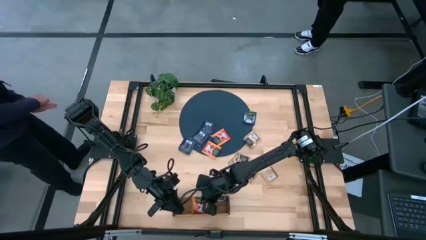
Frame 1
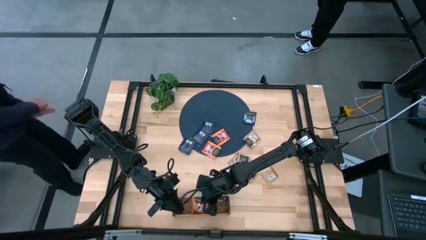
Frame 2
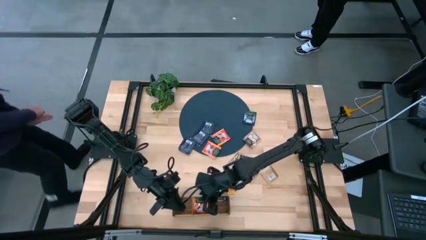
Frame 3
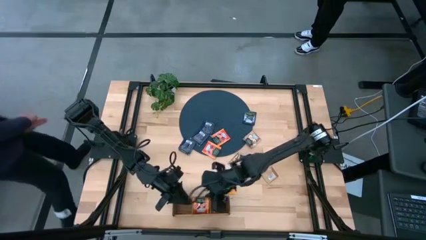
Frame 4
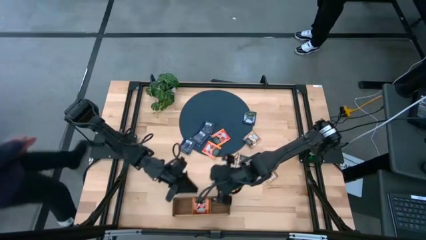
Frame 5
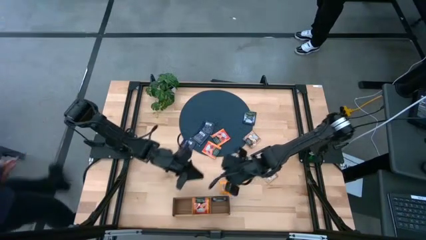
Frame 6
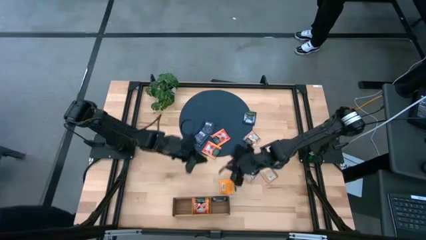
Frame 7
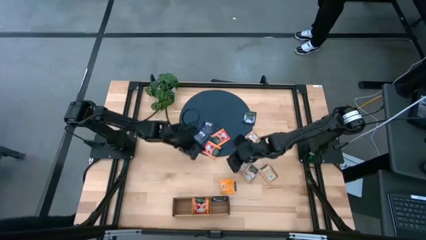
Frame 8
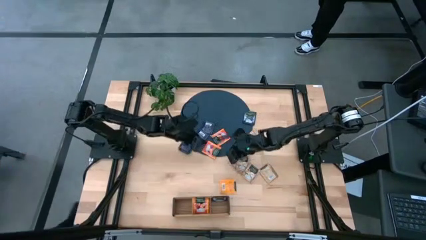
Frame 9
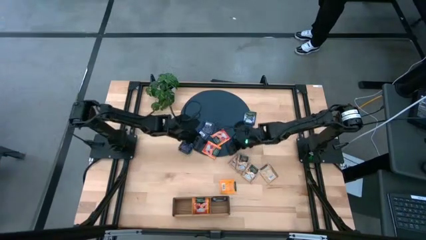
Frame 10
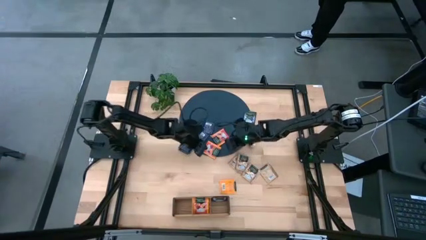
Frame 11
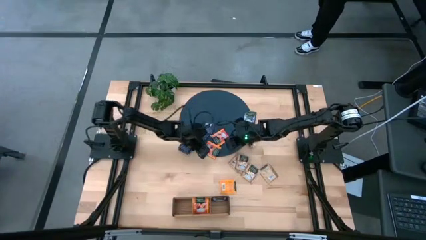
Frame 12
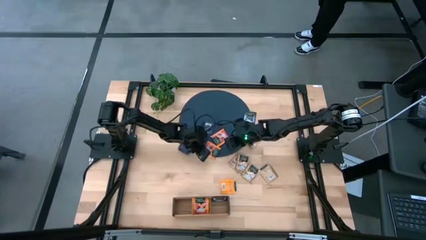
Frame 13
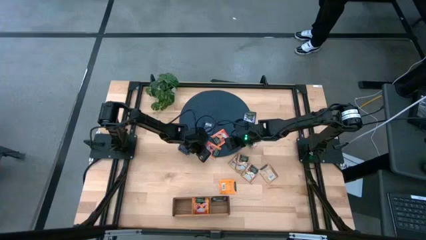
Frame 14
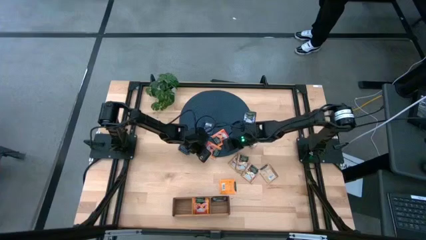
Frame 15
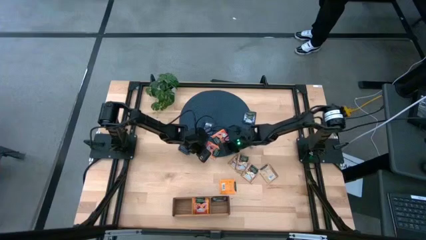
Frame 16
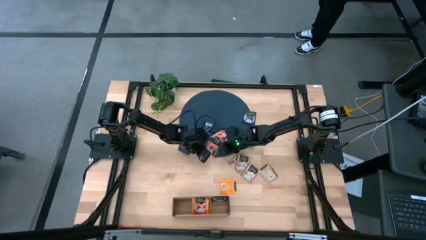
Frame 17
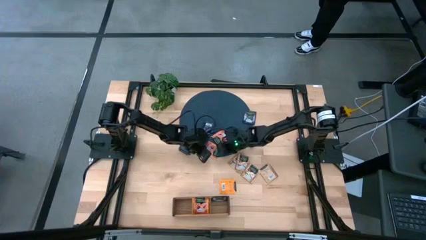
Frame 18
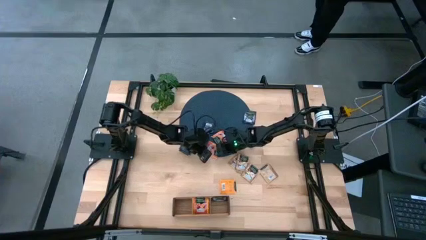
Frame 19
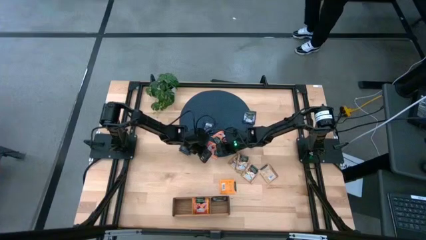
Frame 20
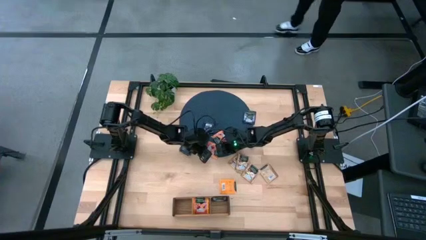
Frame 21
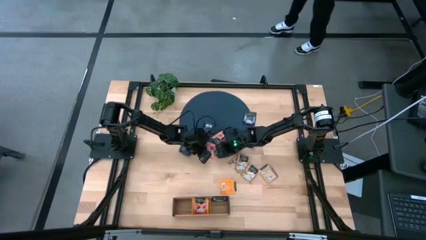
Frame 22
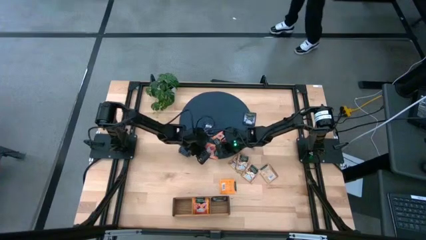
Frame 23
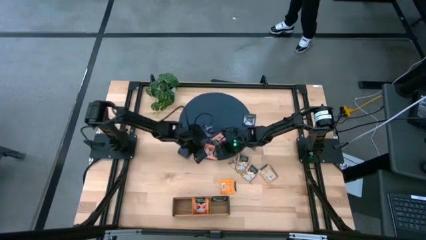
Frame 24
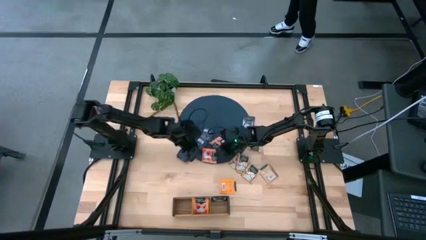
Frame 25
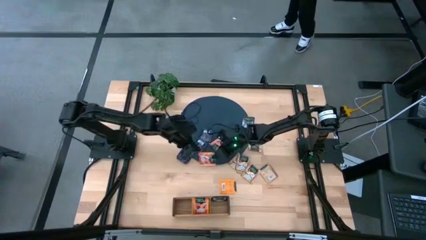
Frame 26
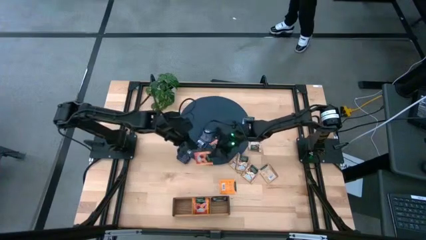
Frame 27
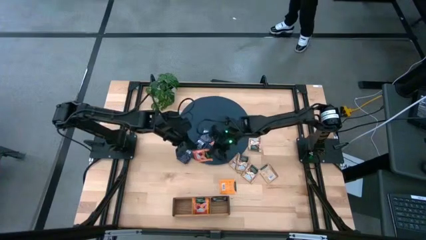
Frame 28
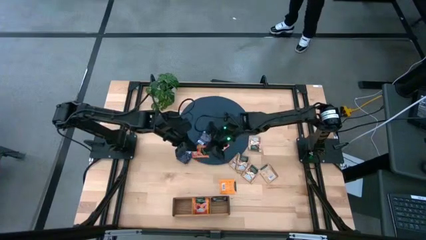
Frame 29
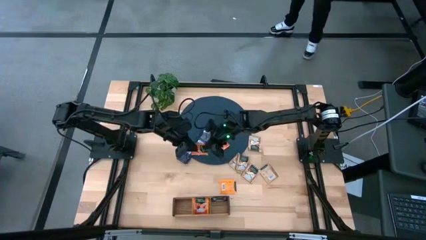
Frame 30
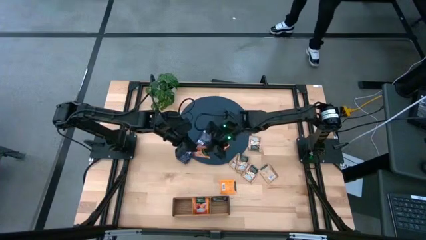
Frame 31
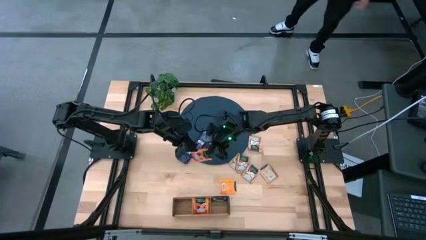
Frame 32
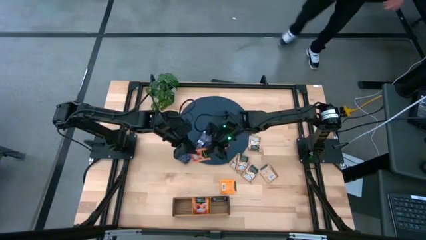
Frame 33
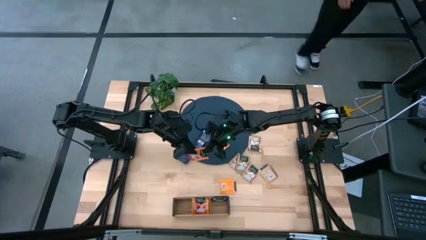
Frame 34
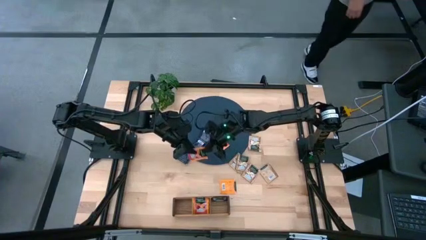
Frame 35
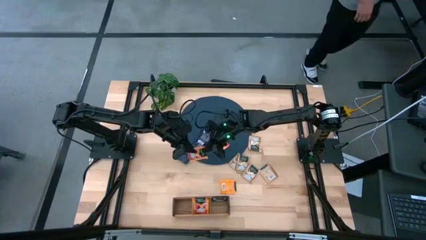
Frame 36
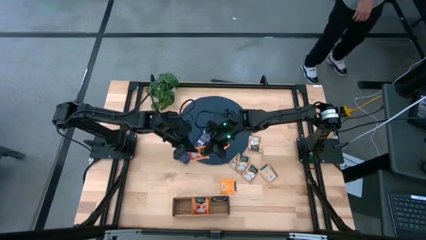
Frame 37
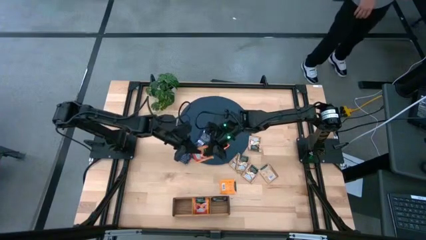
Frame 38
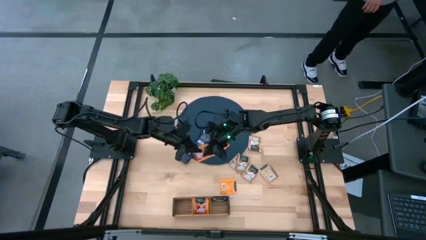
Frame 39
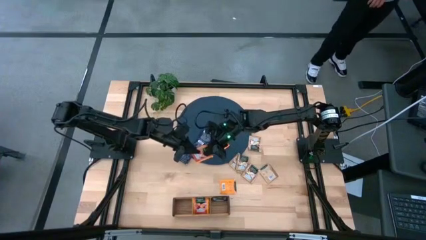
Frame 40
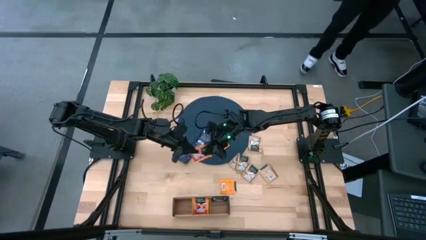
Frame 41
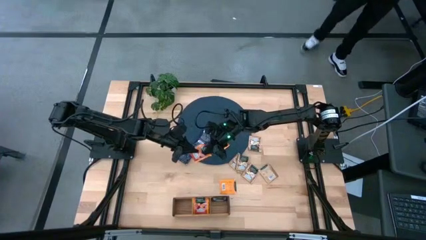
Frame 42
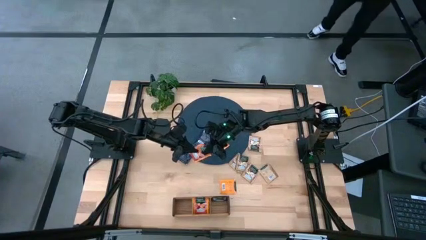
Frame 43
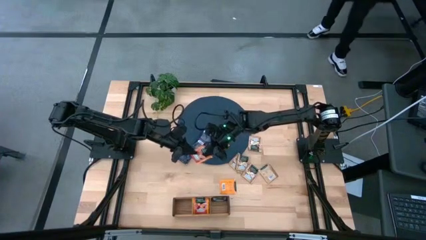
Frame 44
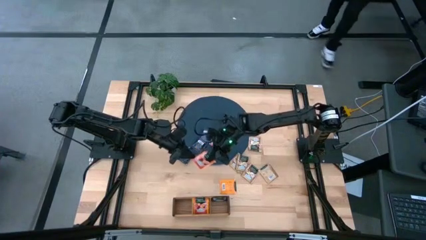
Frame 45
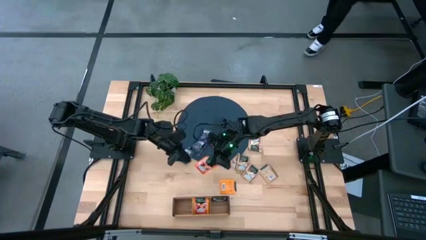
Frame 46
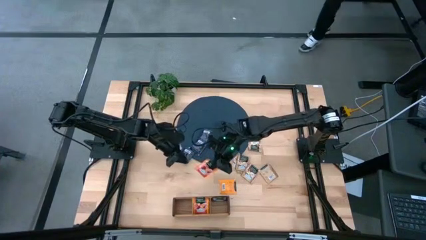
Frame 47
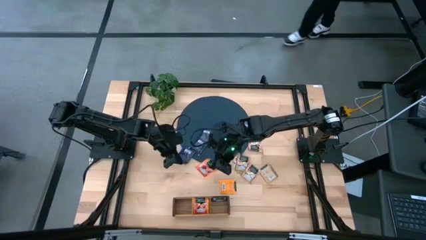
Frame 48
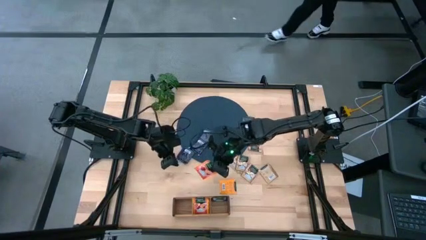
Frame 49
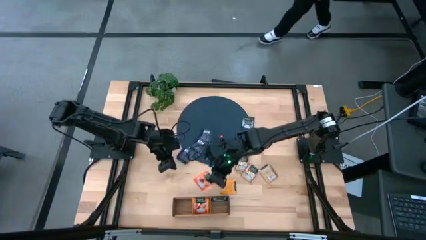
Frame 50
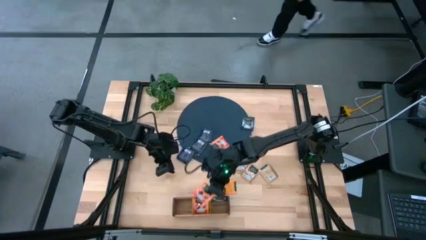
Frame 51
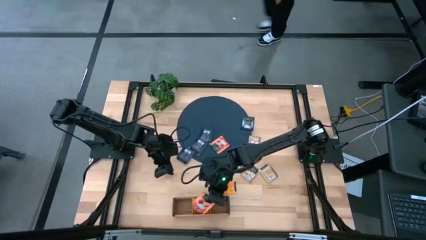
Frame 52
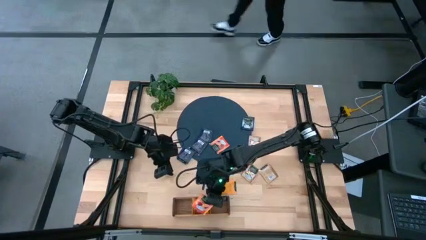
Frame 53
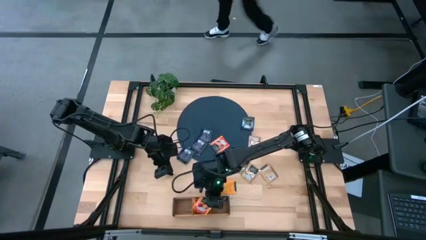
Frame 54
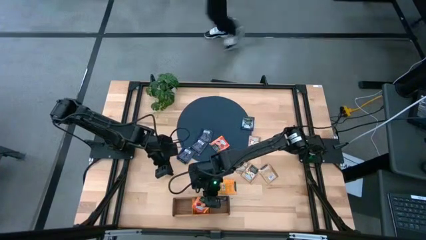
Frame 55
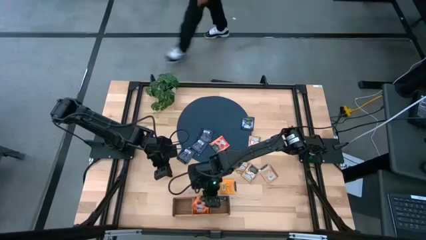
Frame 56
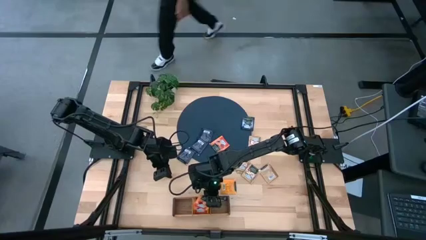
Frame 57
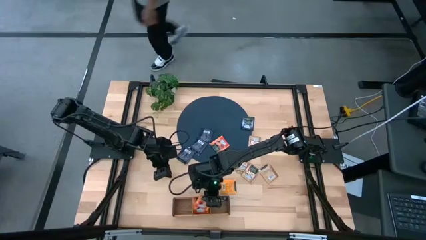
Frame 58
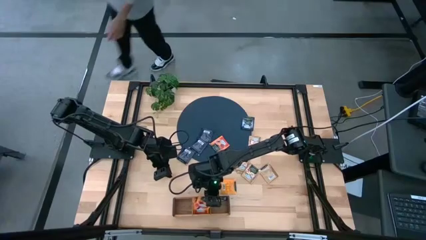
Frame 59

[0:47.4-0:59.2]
Task: Pick & Place Tea
Put the orange tea bag into the middle section of the wooden organizer

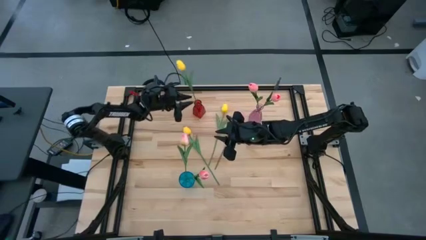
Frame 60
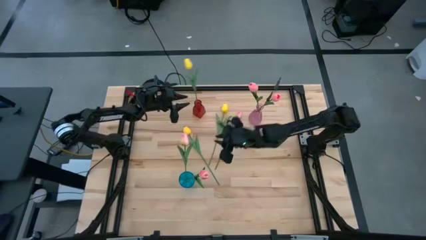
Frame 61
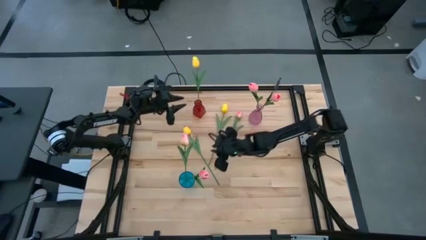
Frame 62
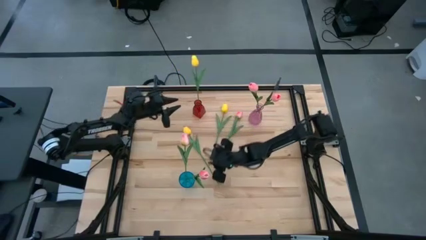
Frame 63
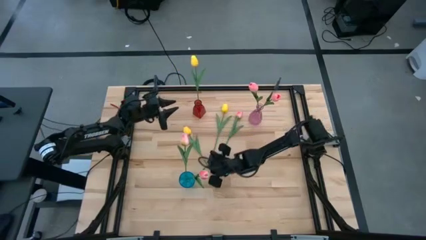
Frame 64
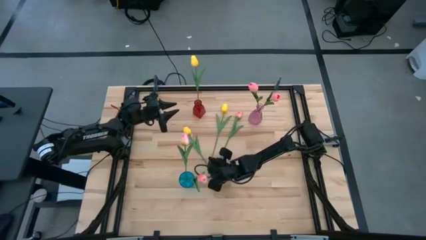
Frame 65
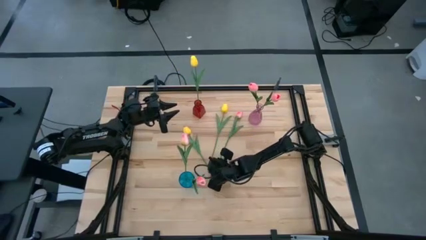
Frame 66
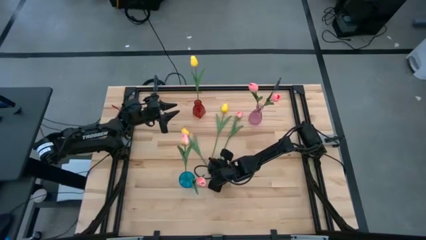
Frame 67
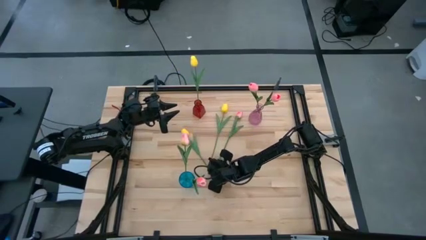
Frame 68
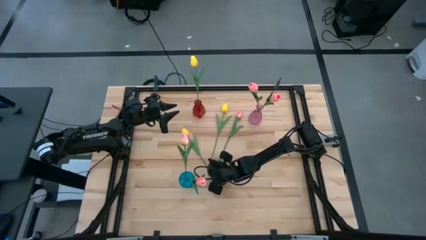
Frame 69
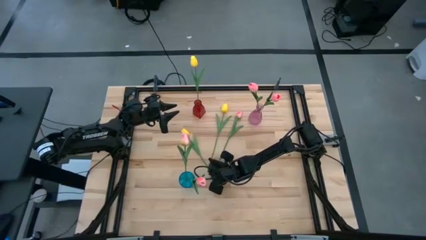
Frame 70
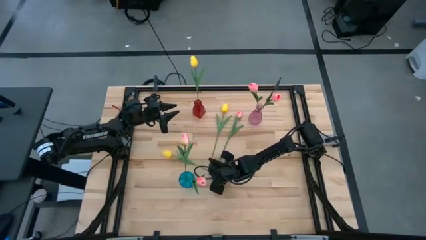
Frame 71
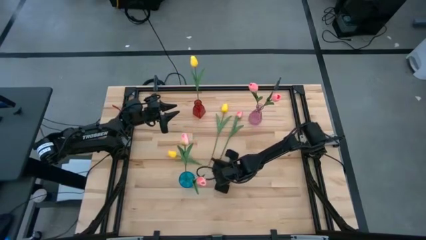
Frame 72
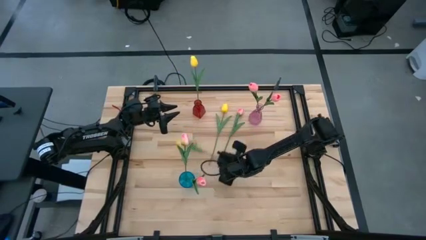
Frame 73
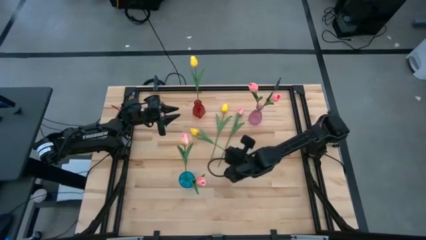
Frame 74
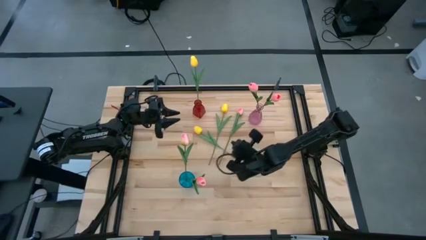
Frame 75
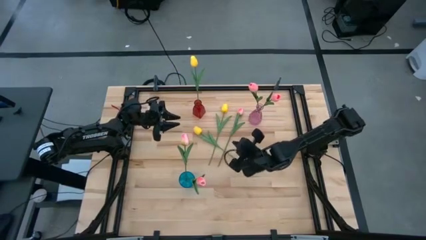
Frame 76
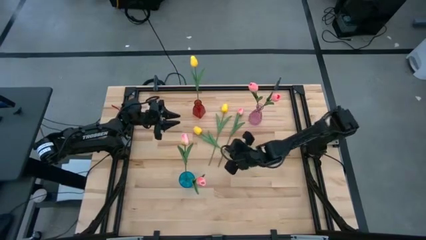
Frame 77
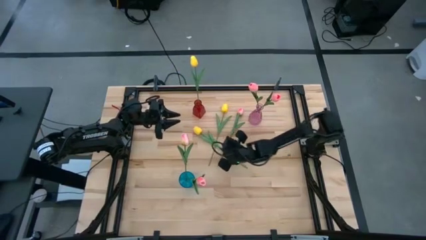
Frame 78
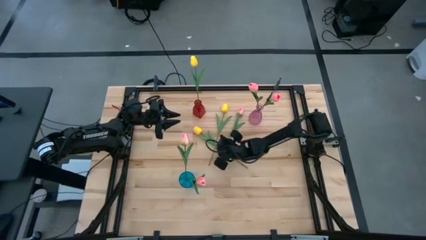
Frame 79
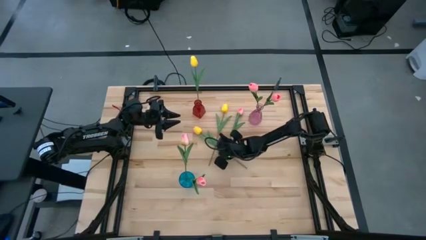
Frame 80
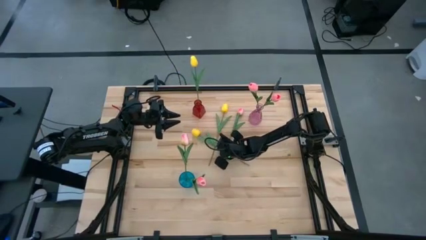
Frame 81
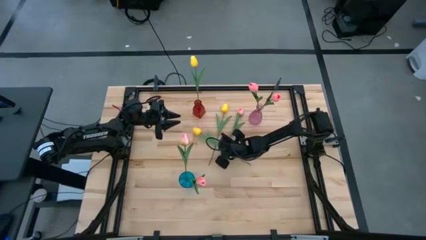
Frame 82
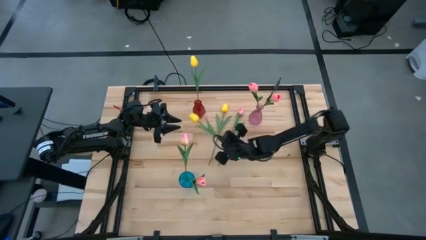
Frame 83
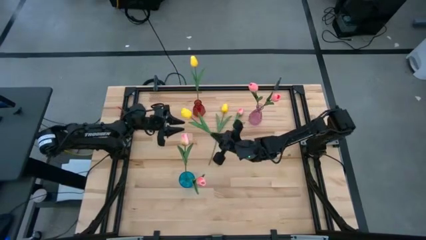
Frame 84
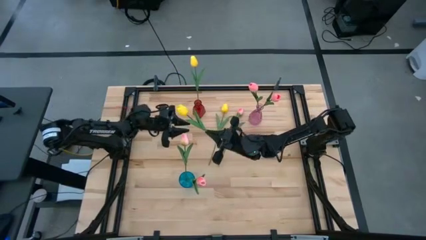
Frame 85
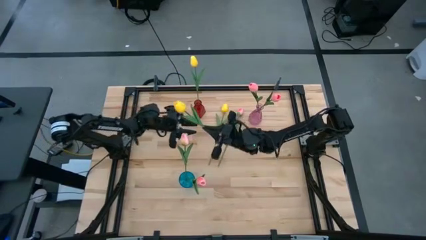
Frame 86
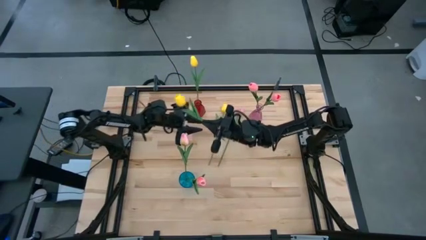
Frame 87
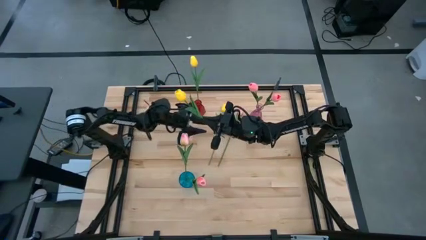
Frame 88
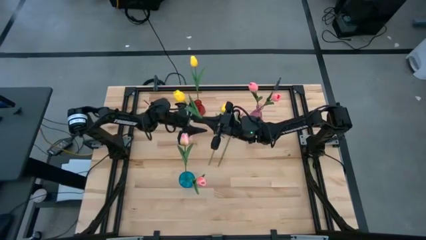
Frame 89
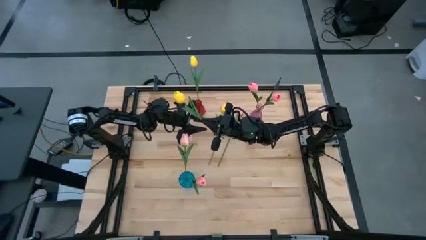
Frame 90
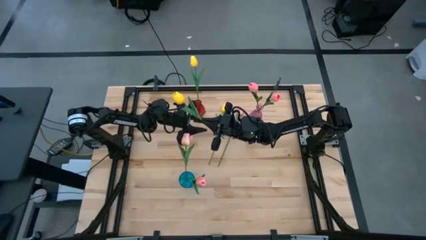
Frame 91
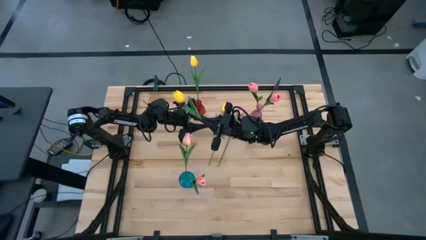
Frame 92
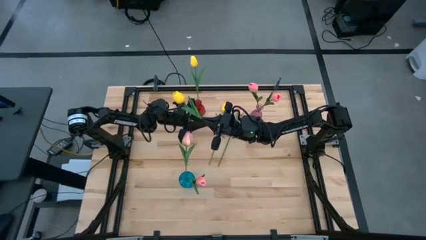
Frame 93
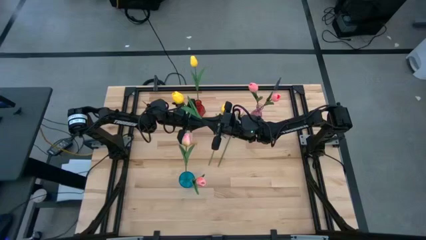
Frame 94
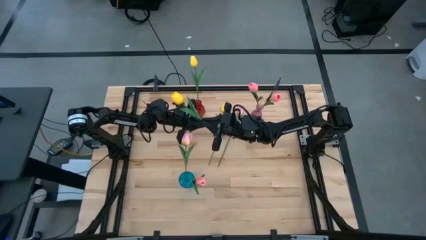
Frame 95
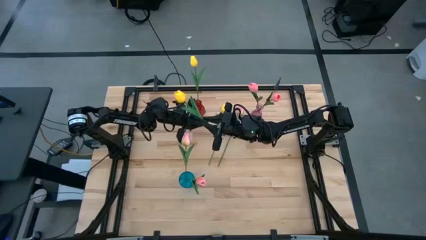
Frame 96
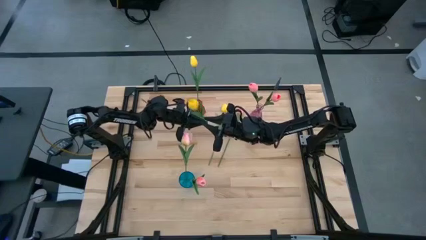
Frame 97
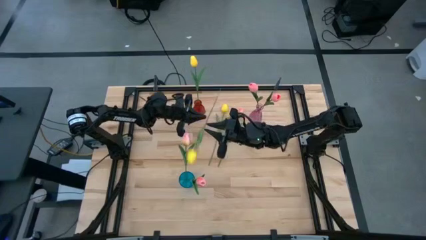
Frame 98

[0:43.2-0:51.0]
Task: Sort flowers into vase by color
Put the bottom yellow tulip into the red flower vase
